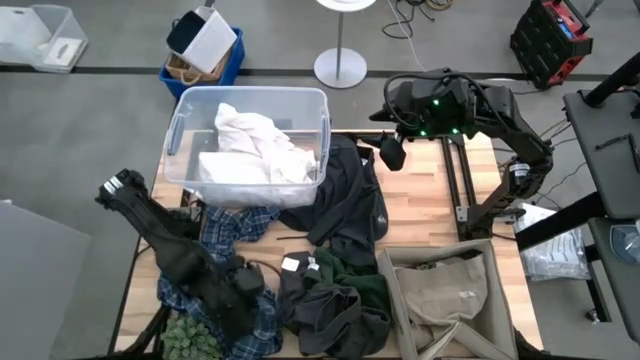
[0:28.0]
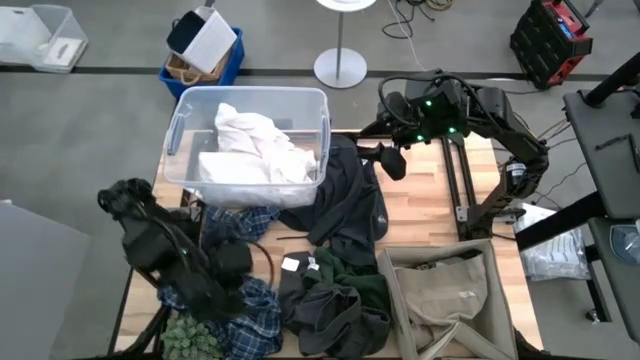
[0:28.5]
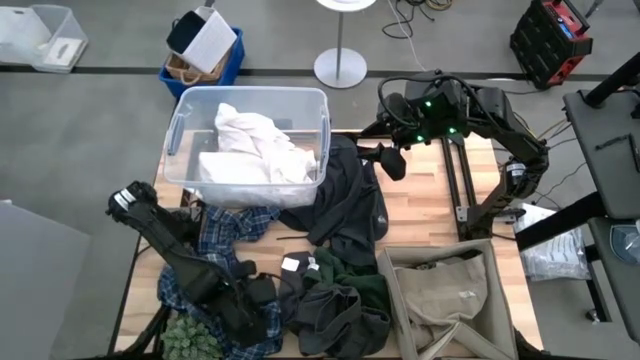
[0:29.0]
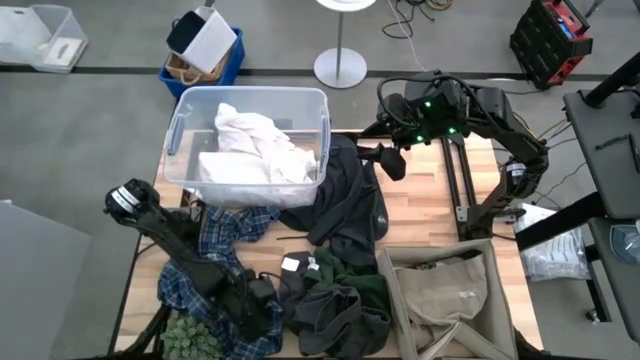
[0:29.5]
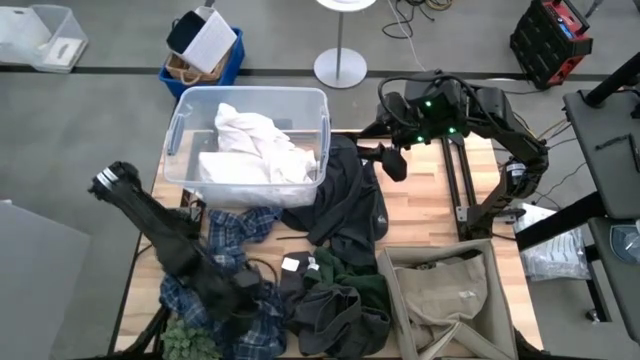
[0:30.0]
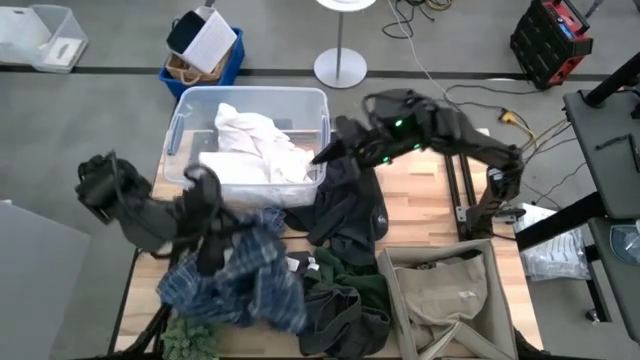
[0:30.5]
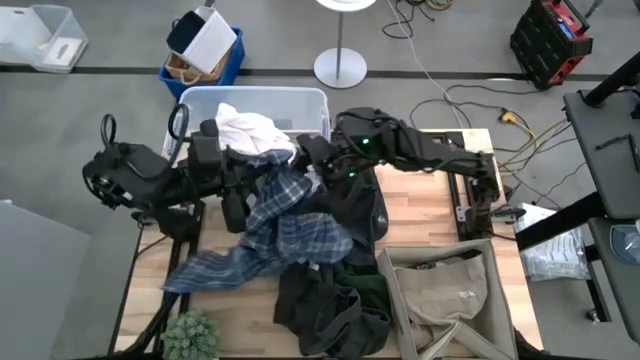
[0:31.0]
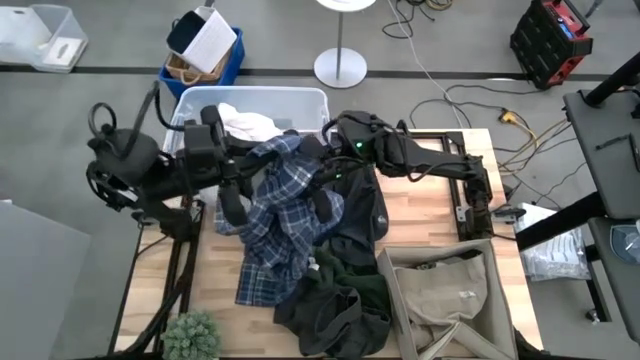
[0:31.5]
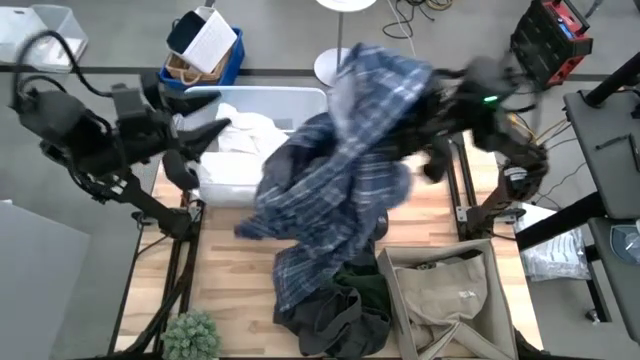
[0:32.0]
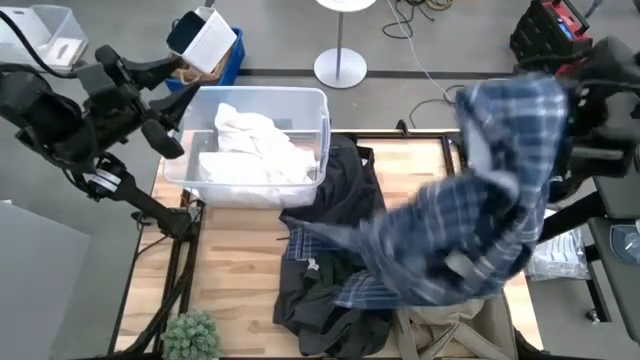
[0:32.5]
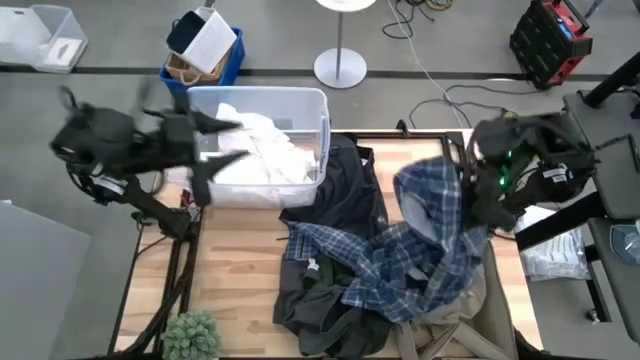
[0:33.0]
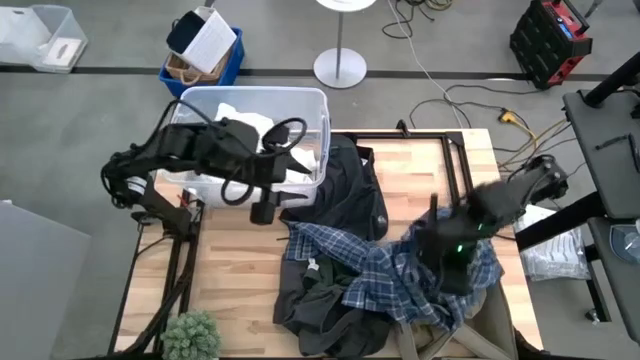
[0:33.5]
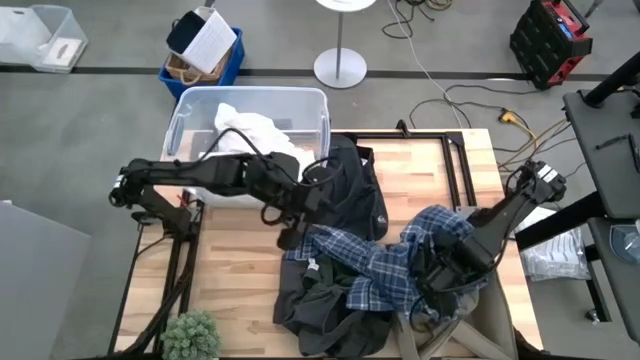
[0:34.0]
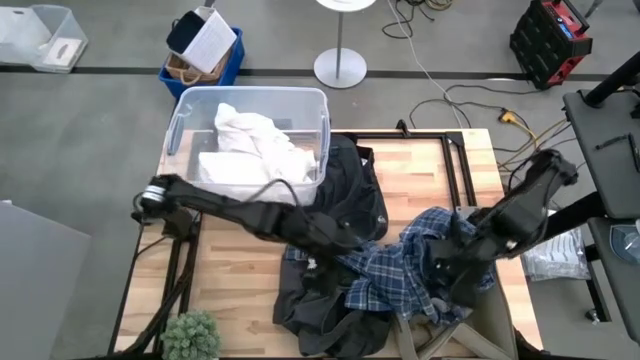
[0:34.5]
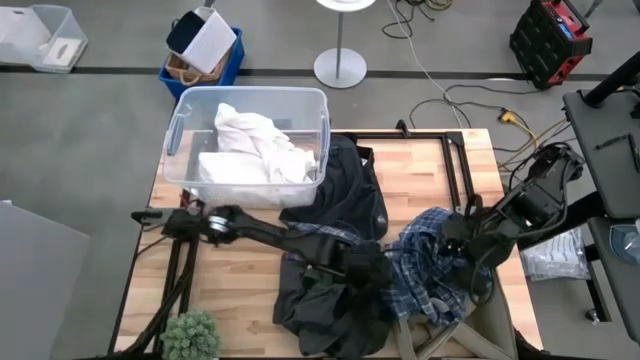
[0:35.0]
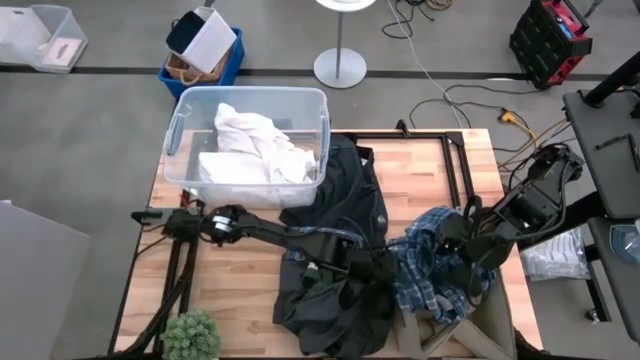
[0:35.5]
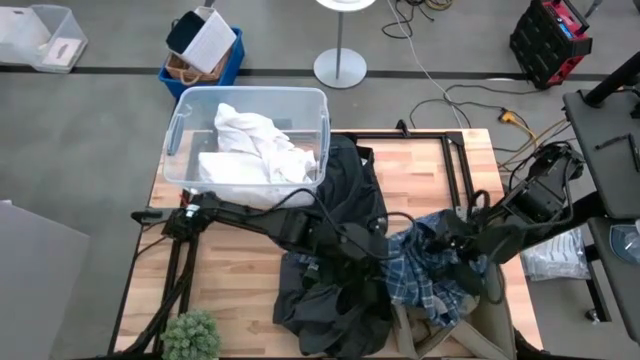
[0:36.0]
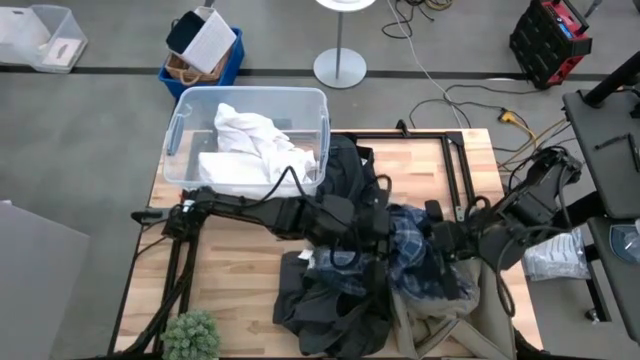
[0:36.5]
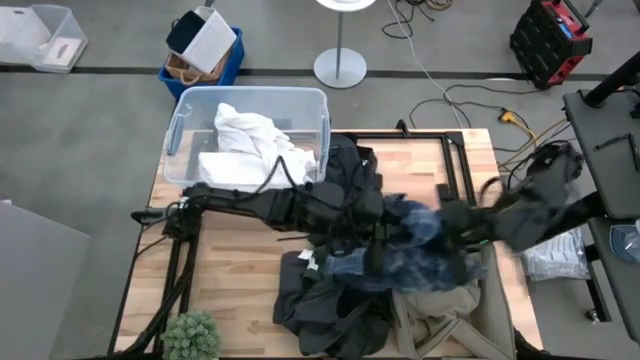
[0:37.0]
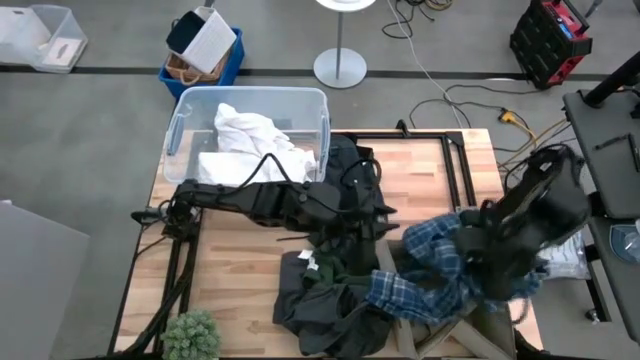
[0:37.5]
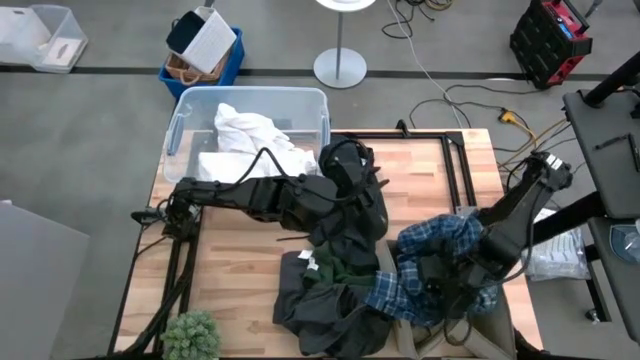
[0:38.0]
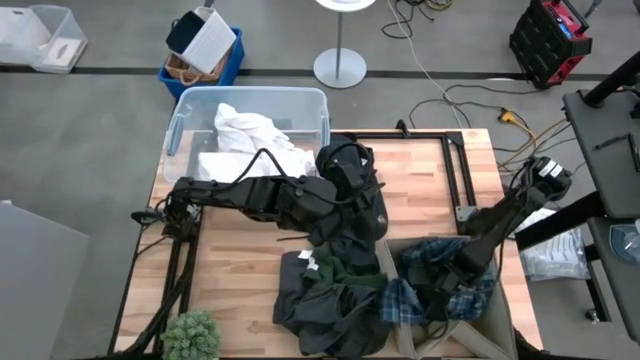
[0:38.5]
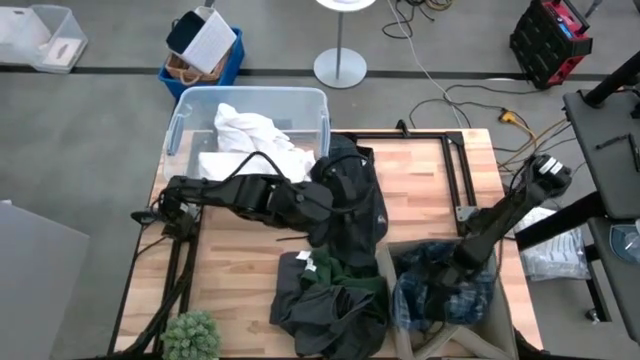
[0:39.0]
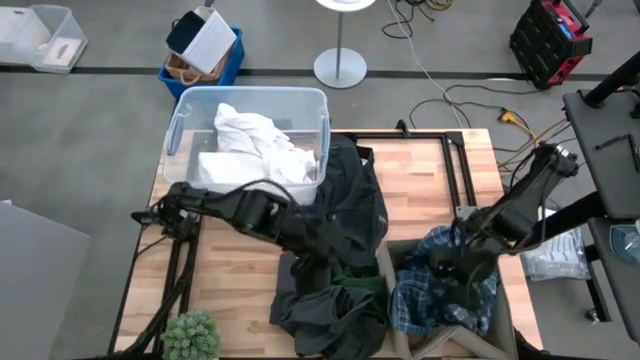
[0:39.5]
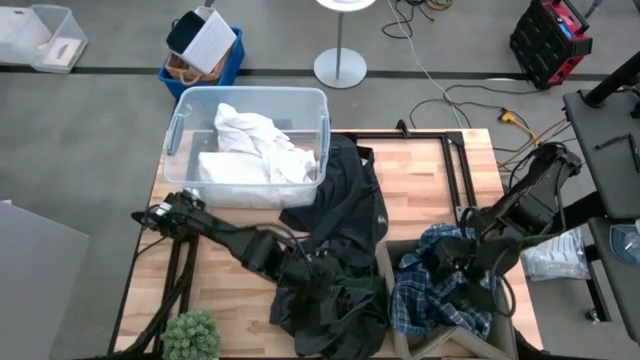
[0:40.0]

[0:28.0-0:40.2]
Task: Sort clothes
Put the blue checkered shirt into the laundry organizer

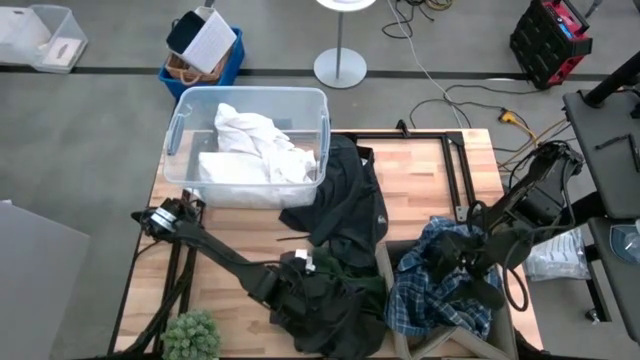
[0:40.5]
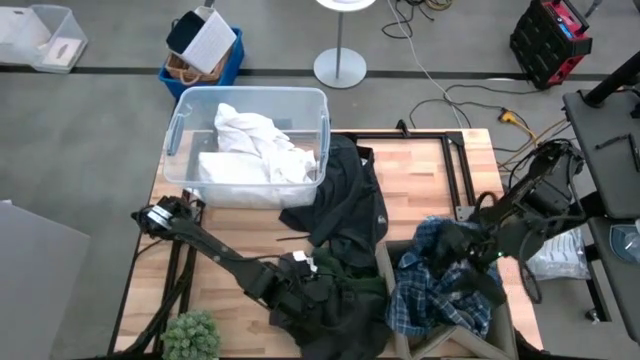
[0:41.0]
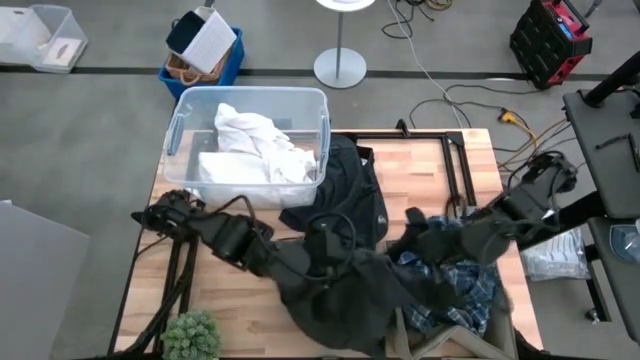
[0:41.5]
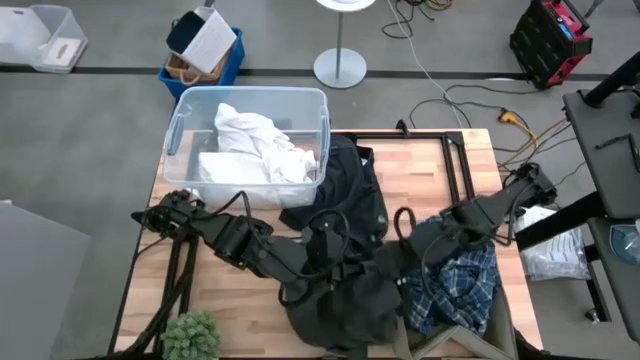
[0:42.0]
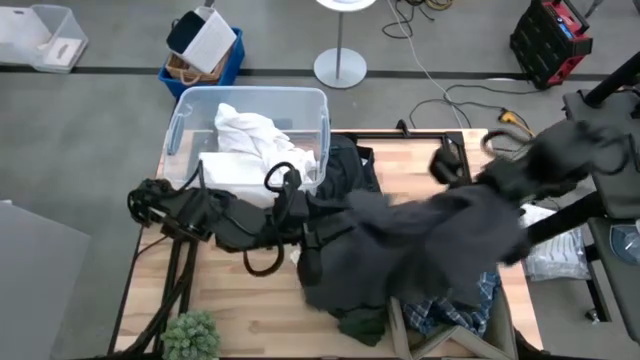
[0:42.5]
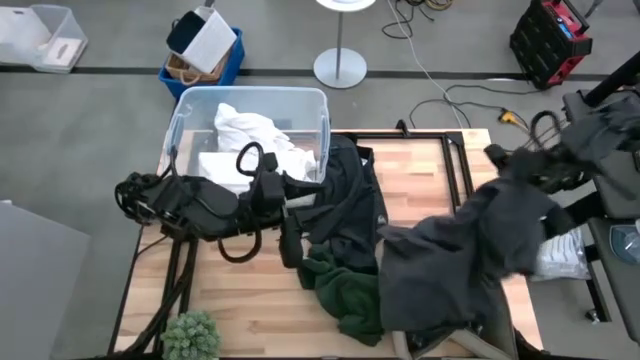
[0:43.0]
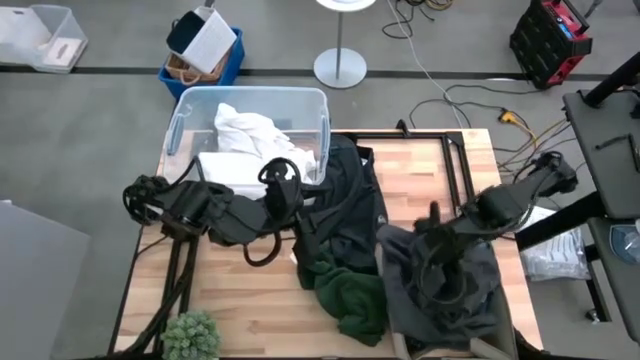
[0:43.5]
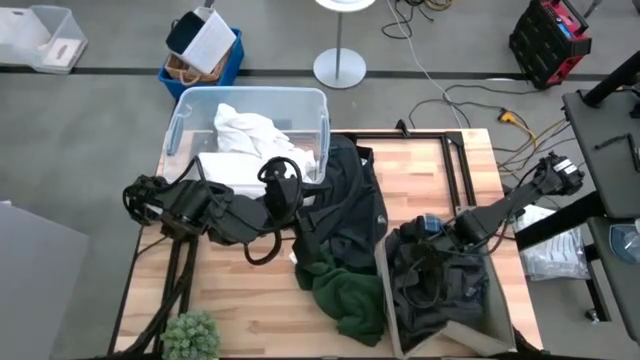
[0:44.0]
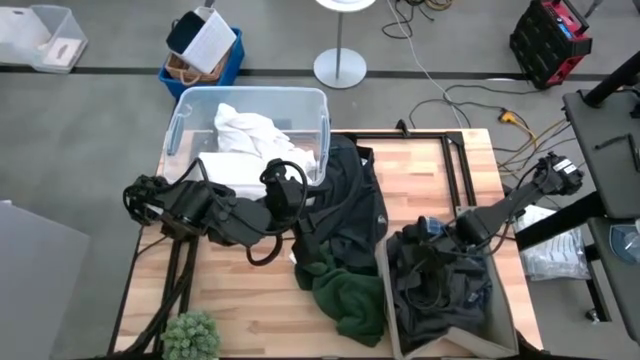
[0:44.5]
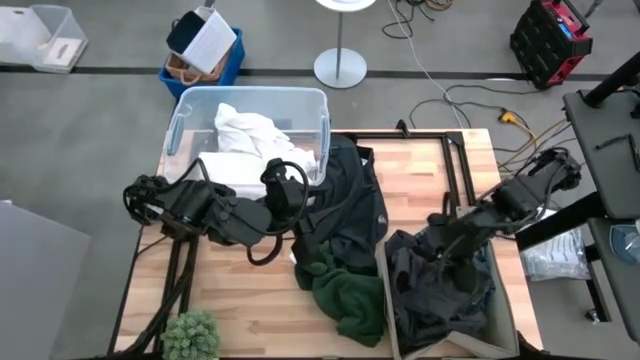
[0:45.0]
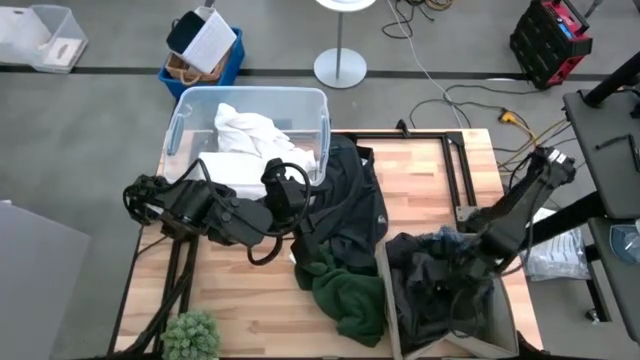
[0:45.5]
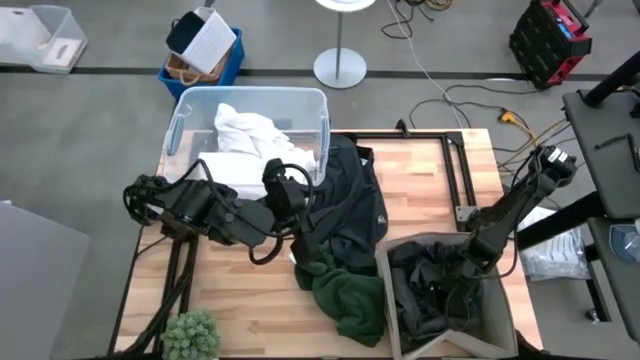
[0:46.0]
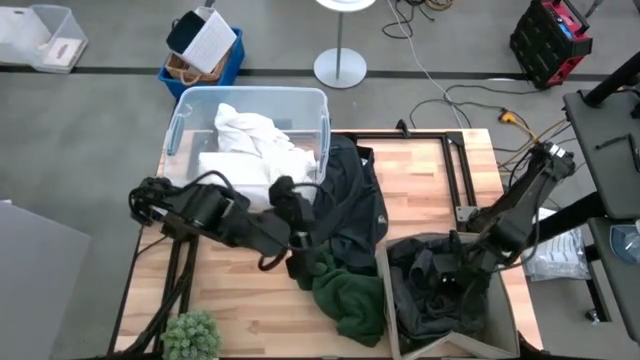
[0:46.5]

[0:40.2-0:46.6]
Put the gray pants into the laundry organizer

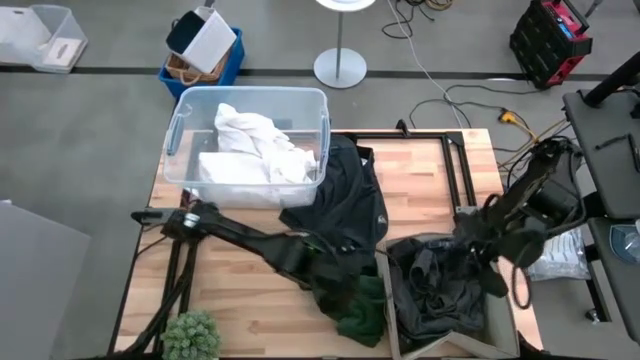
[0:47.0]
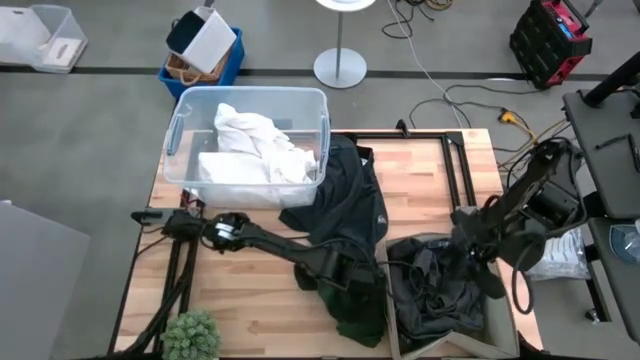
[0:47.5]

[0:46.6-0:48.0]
Put the dark green shirt into the laundry organizer
